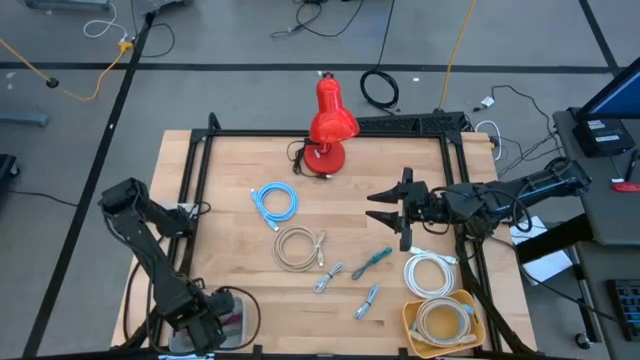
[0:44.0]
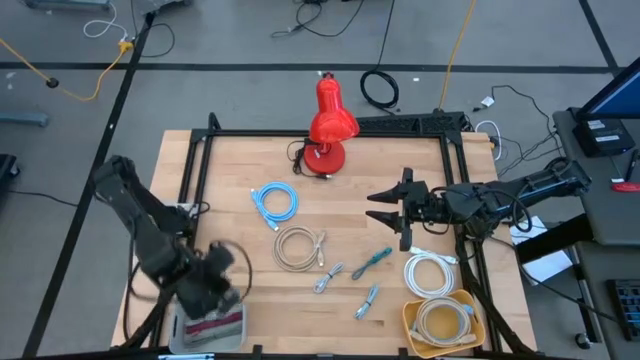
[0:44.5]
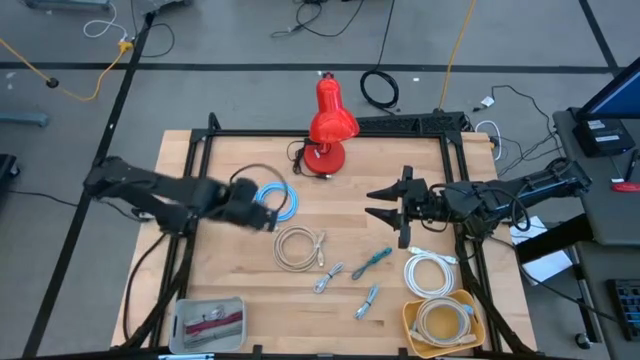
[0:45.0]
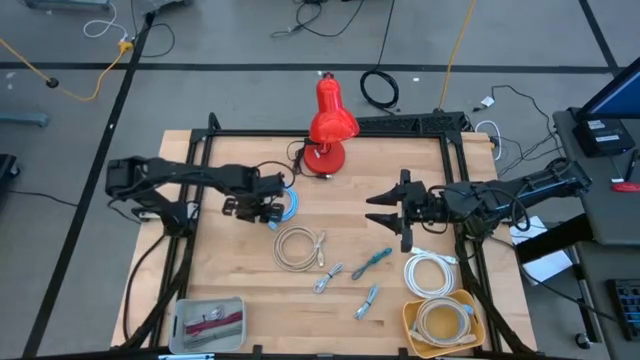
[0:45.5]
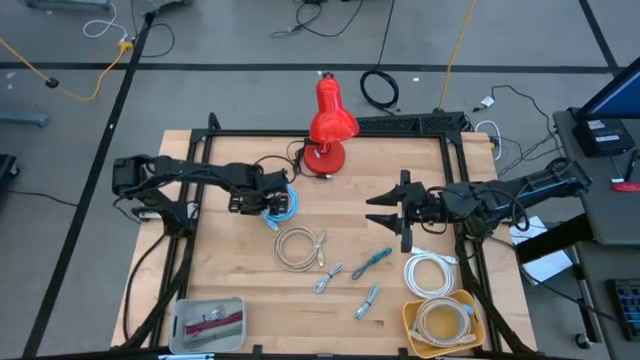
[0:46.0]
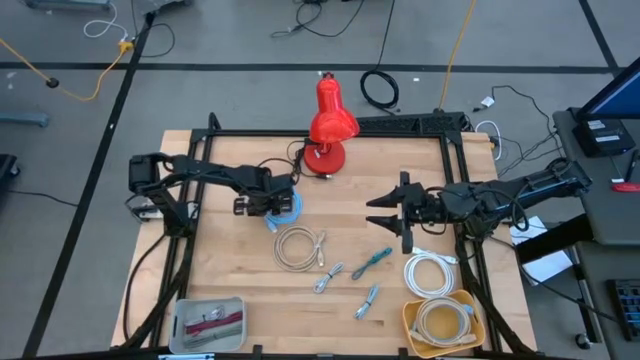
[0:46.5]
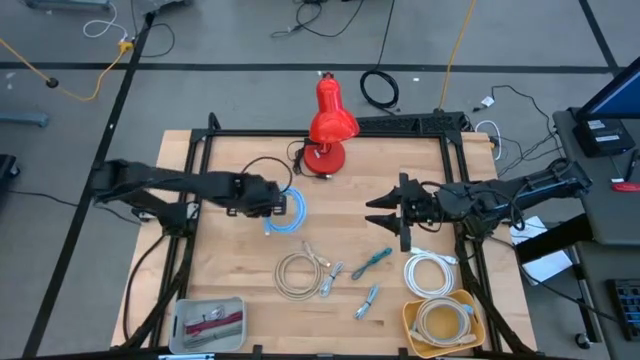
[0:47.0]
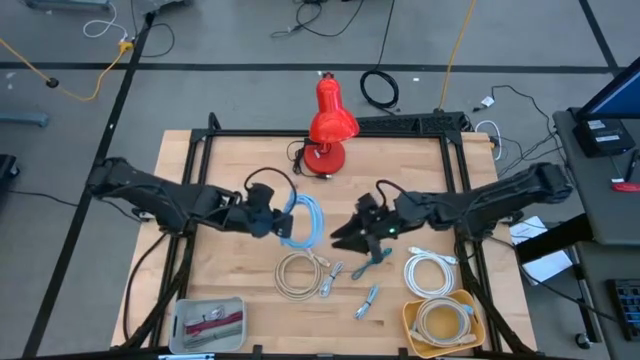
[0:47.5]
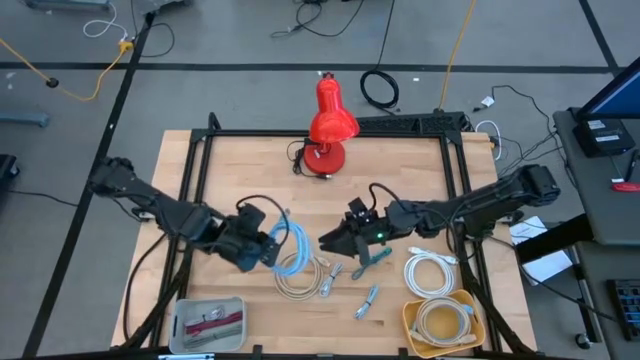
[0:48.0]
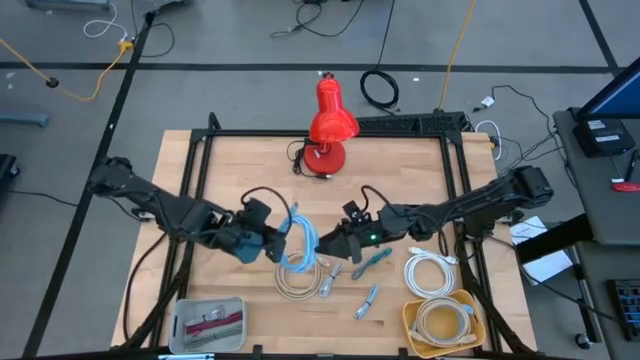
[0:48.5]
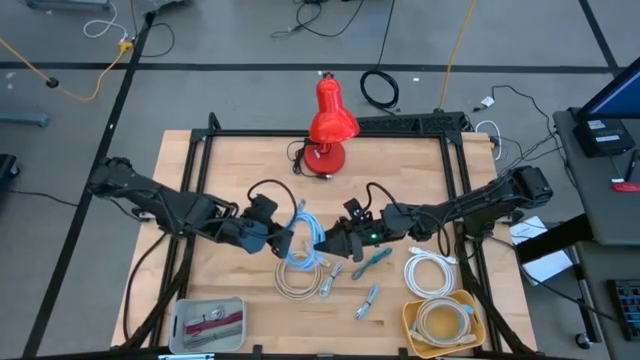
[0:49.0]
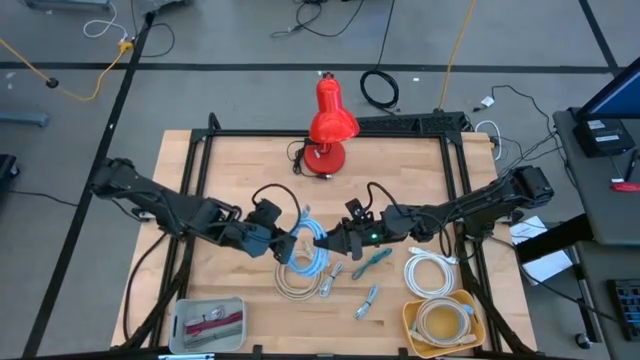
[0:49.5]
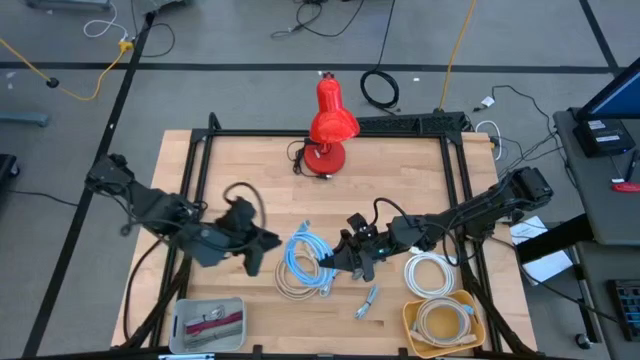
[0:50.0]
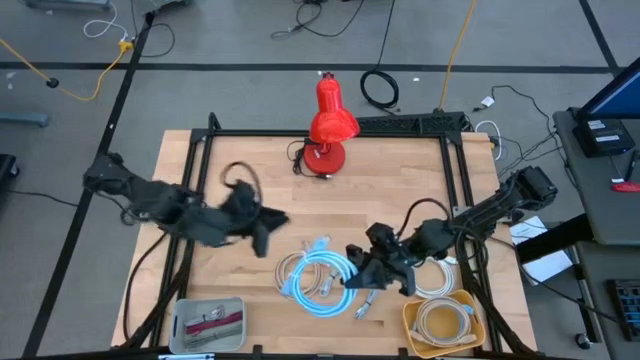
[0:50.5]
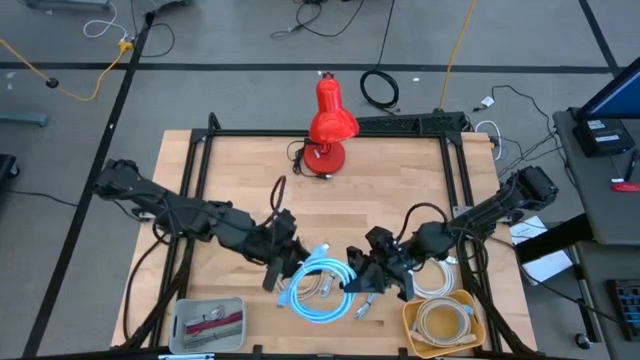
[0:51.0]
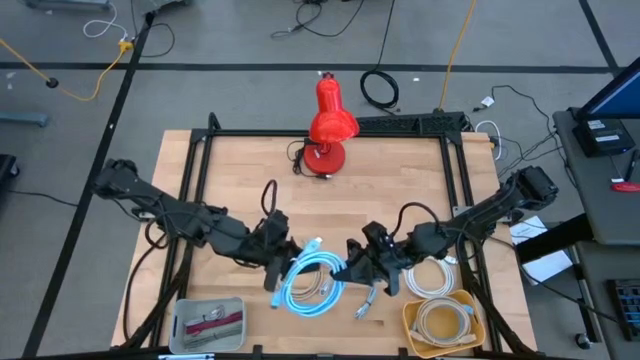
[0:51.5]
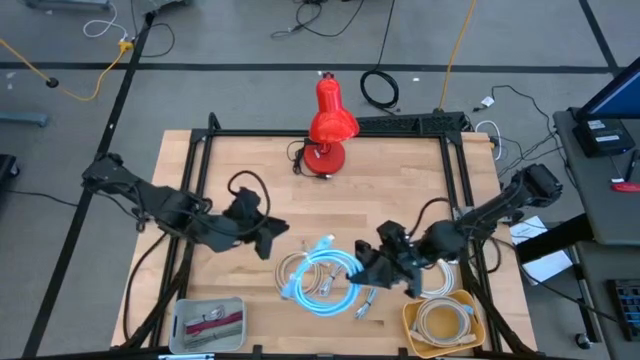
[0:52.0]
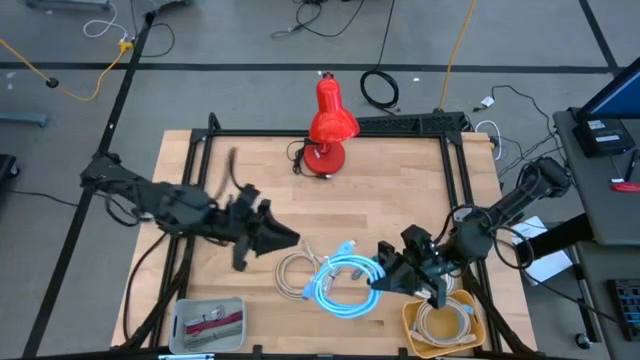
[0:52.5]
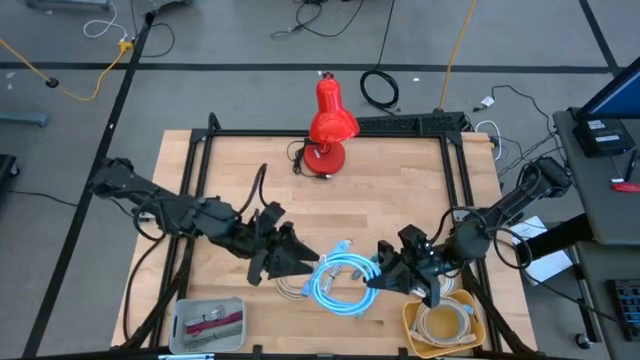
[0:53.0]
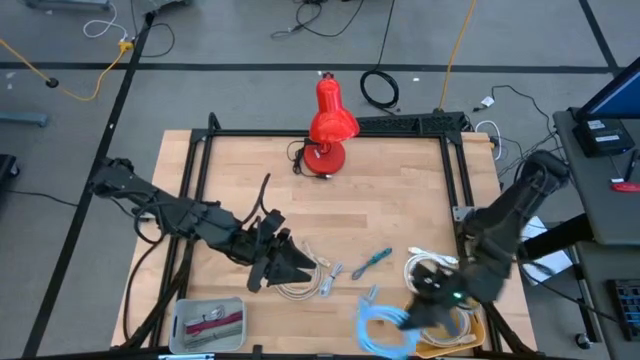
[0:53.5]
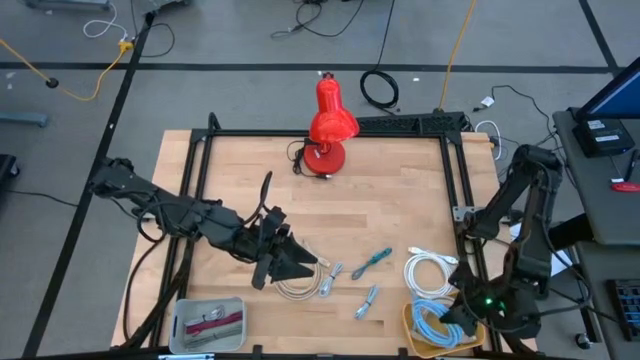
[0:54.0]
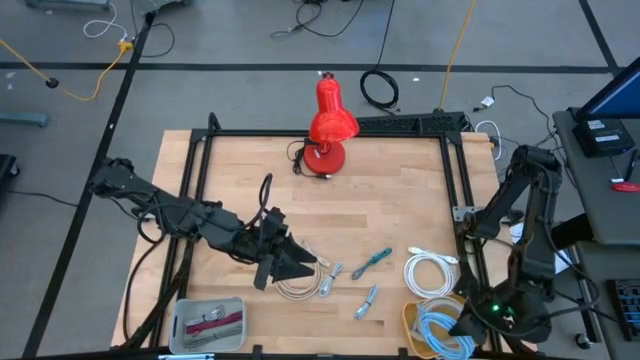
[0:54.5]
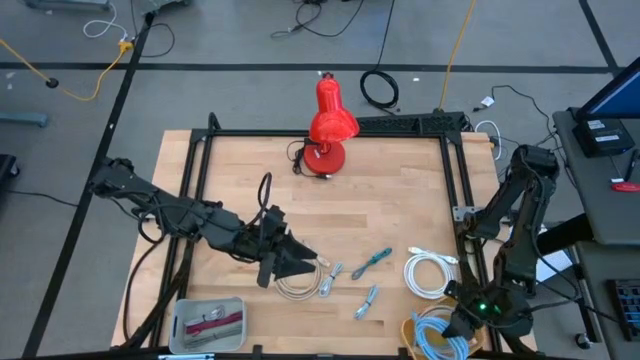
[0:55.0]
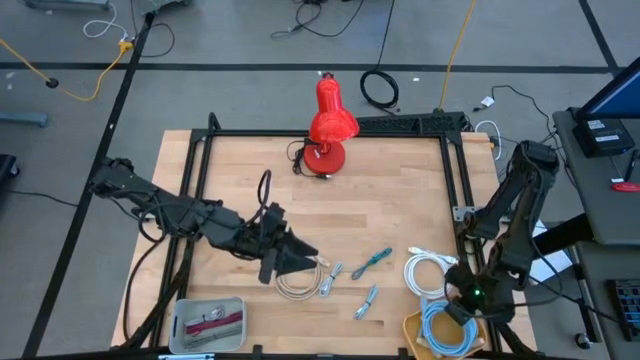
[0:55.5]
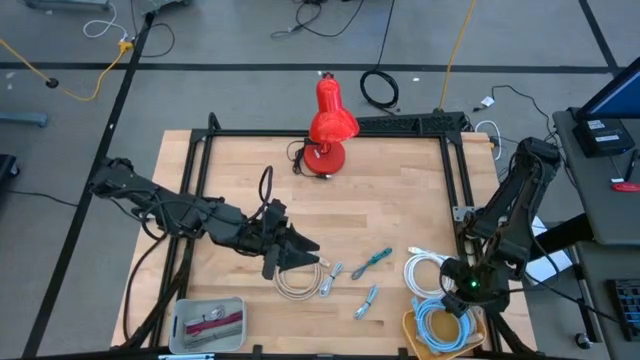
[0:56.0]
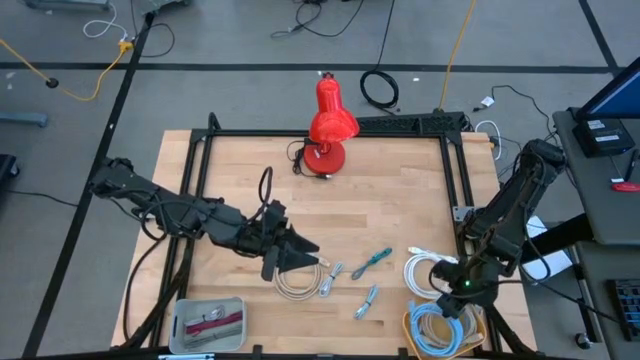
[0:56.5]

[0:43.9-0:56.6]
Task: Pick & Place USB Port
Put the blue HDMI cable into the yellow bin

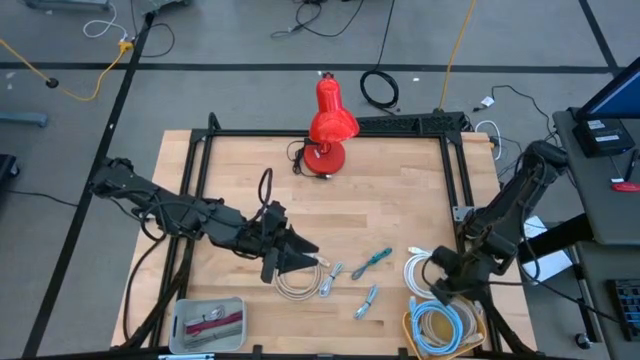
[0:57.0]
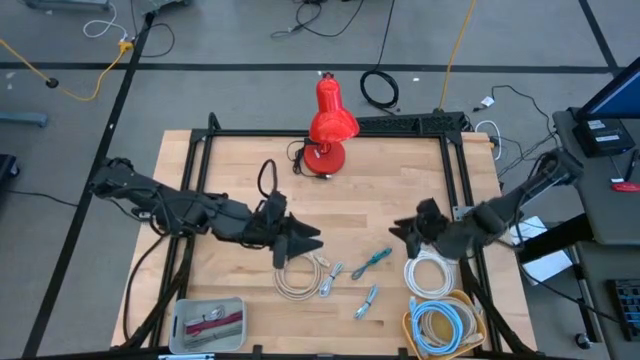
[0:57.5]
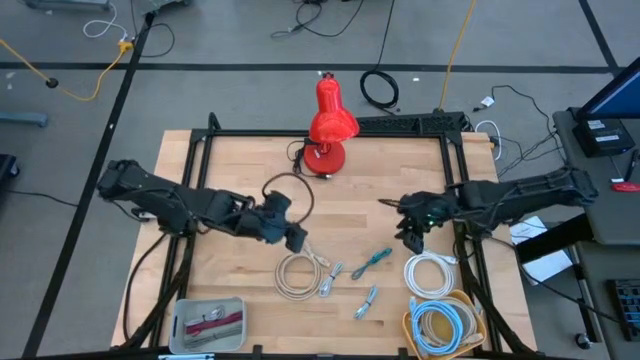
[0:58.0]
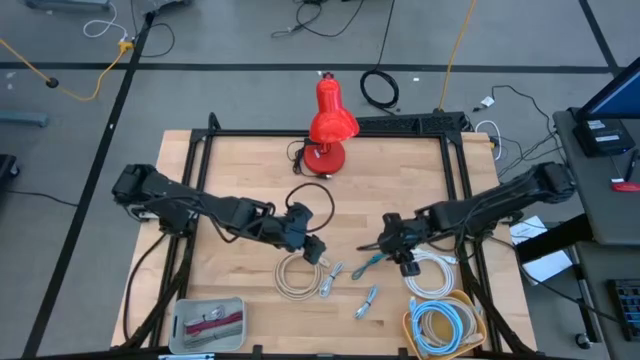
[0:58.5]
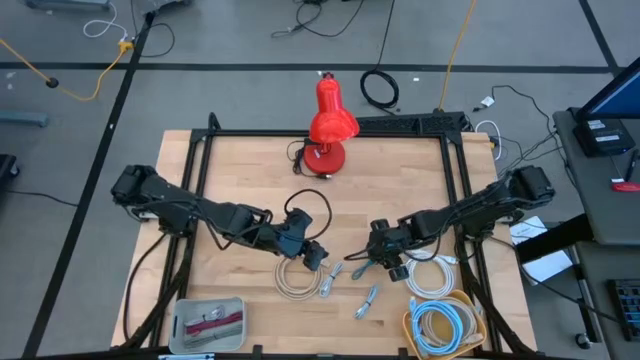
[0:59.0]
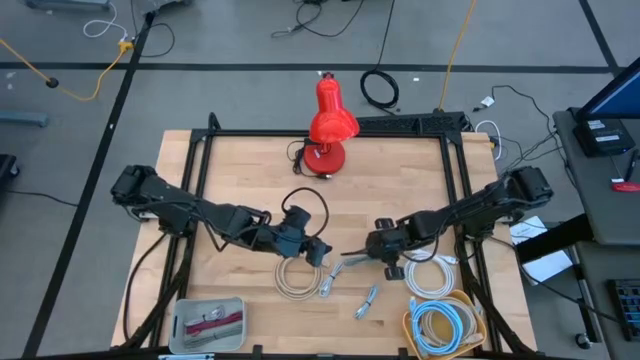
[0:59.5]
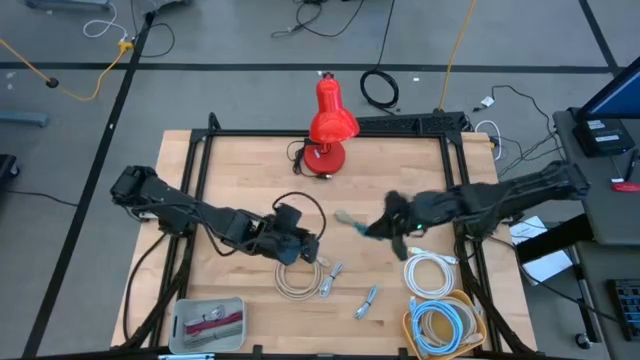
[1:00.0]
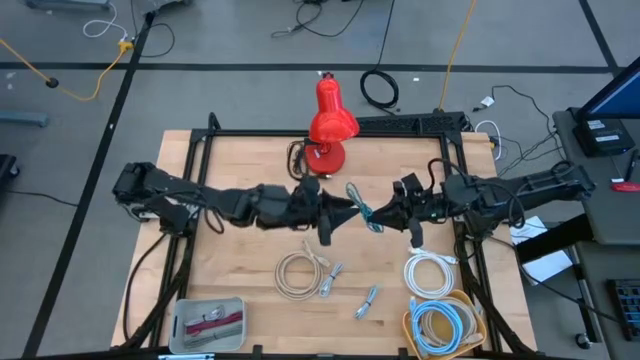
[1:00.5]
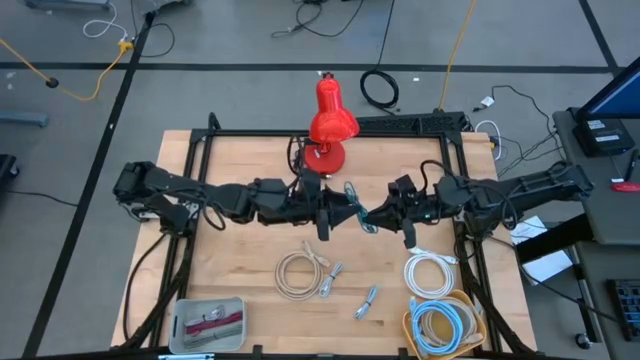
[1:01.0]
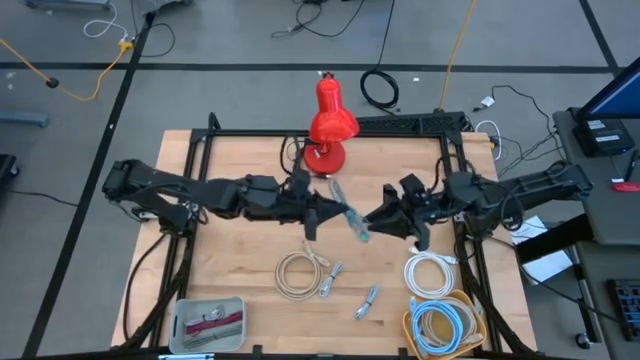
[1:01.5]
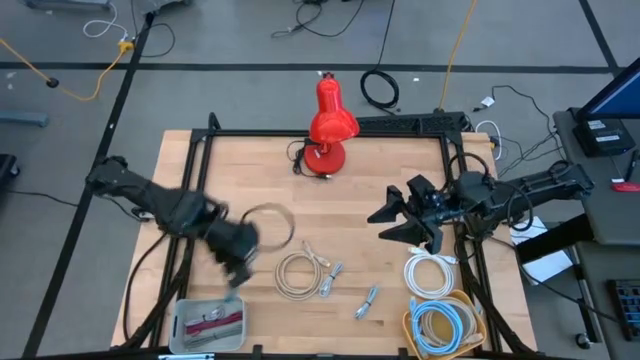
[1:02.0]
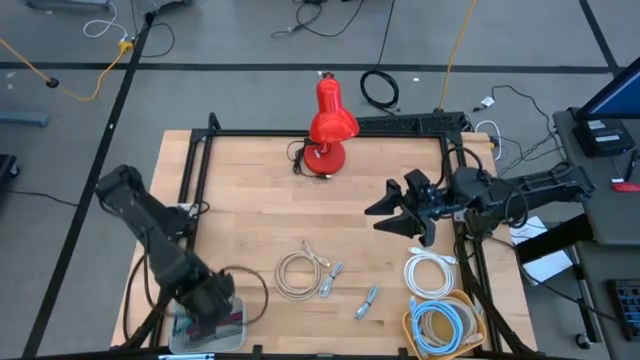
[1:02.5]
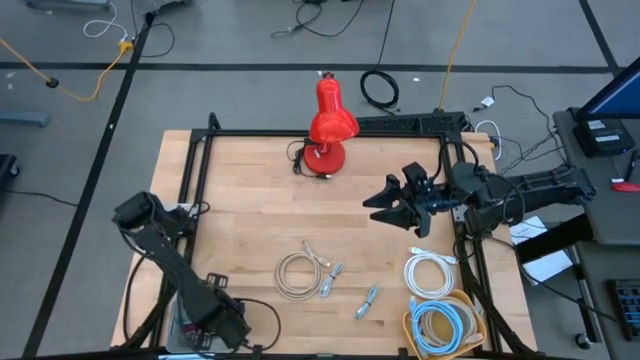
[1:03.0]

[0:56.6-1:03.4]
Put the black and blue charger cable into the white bin
